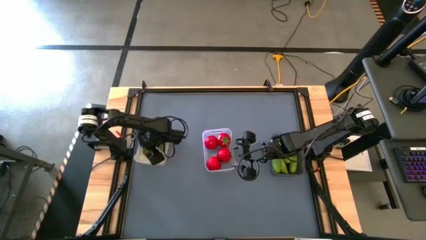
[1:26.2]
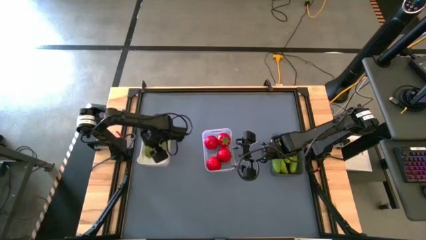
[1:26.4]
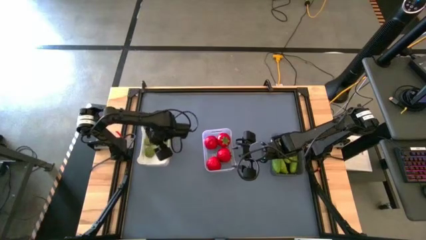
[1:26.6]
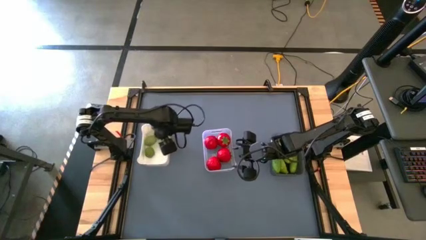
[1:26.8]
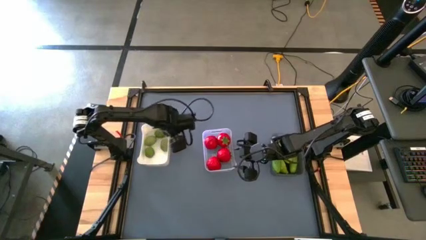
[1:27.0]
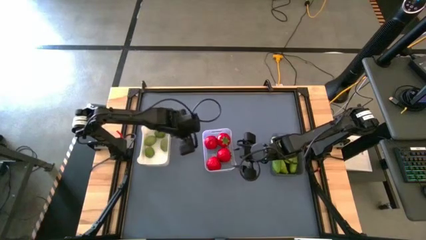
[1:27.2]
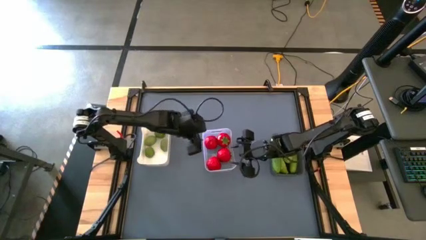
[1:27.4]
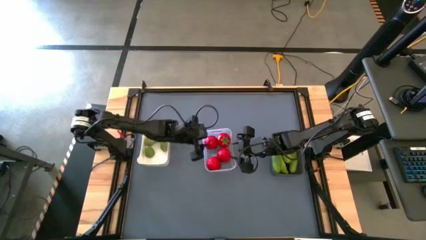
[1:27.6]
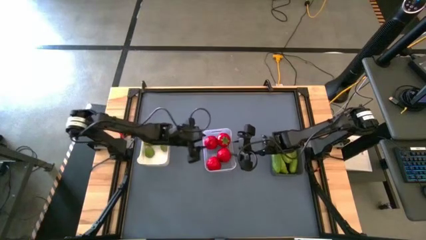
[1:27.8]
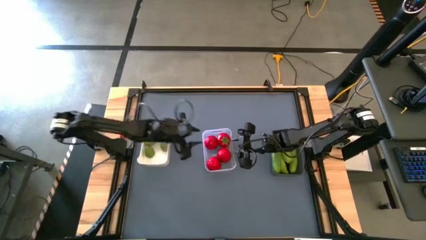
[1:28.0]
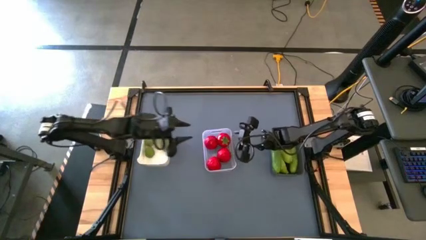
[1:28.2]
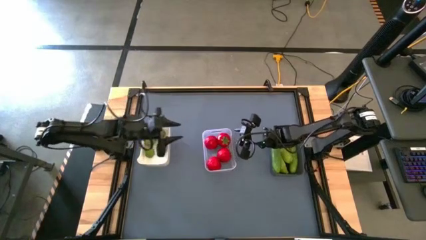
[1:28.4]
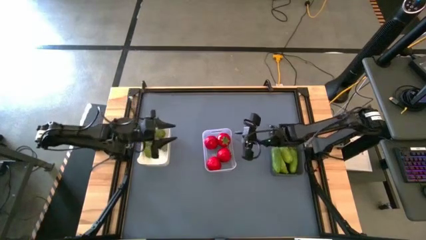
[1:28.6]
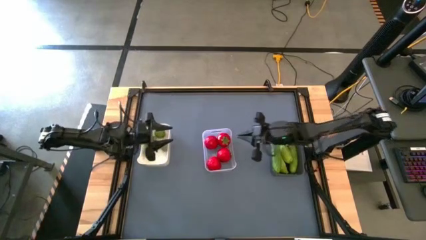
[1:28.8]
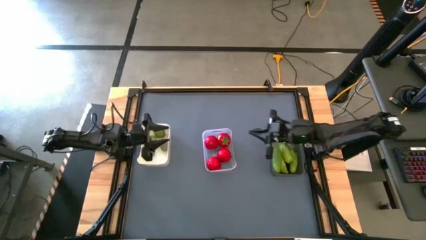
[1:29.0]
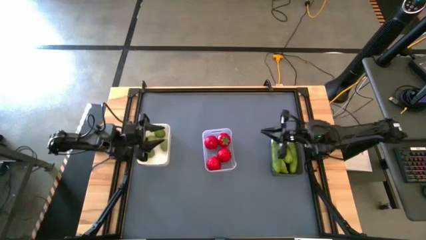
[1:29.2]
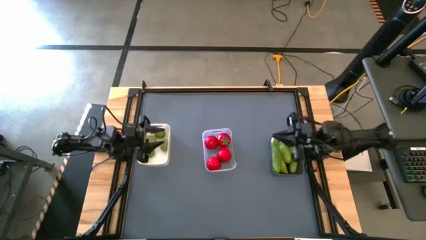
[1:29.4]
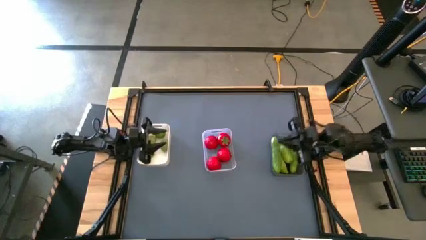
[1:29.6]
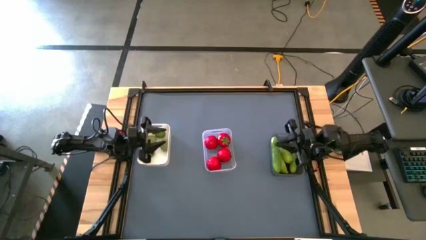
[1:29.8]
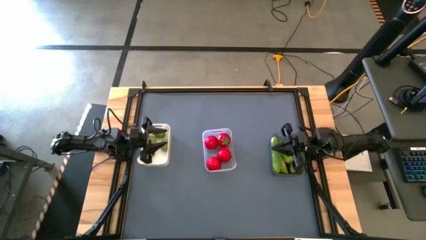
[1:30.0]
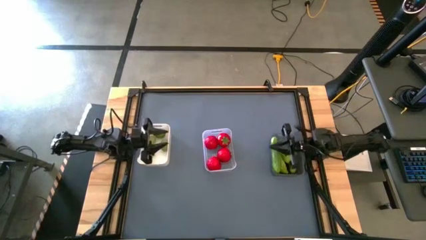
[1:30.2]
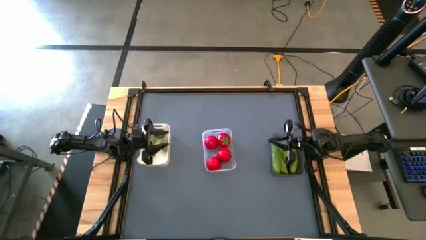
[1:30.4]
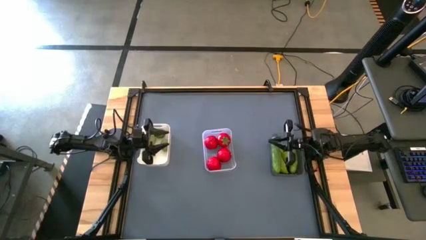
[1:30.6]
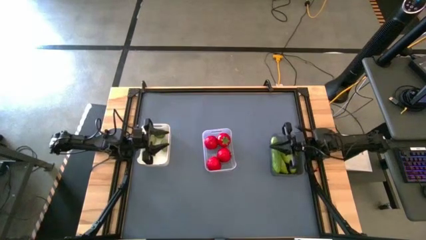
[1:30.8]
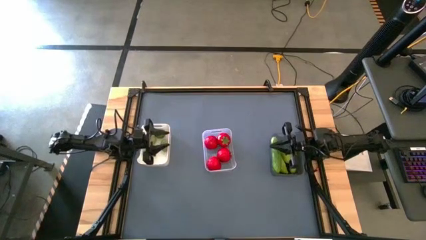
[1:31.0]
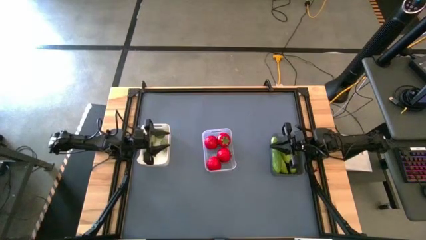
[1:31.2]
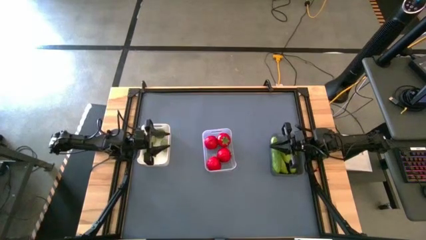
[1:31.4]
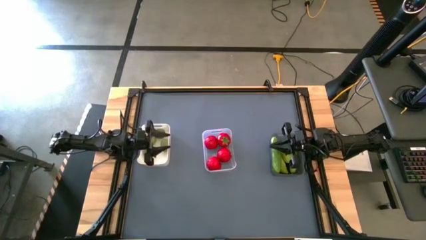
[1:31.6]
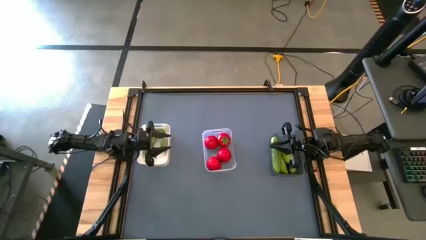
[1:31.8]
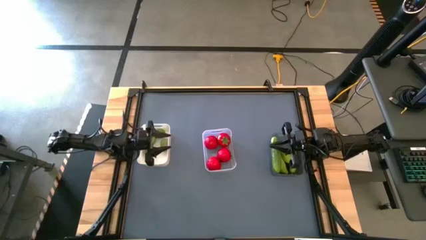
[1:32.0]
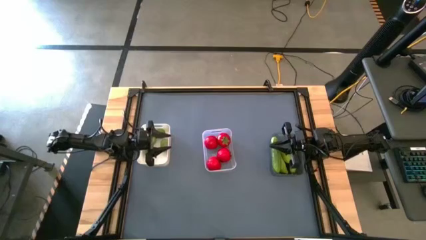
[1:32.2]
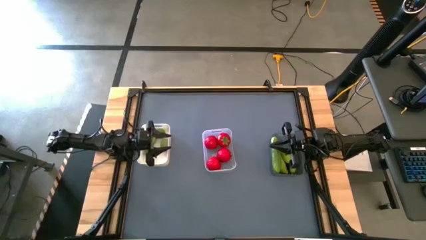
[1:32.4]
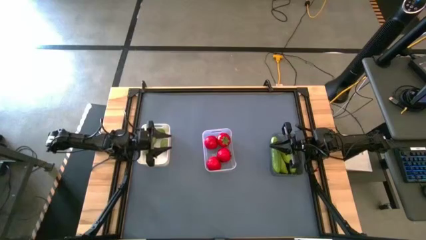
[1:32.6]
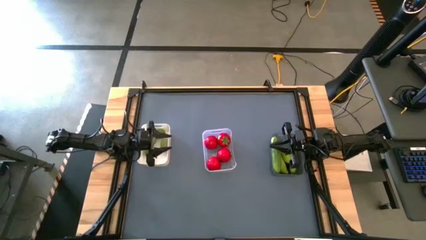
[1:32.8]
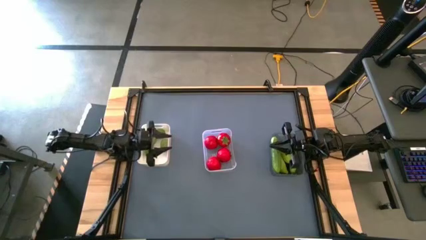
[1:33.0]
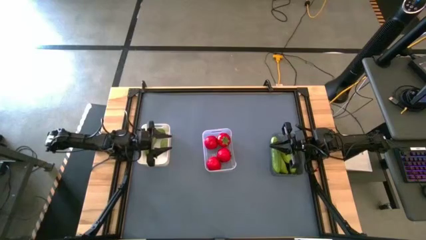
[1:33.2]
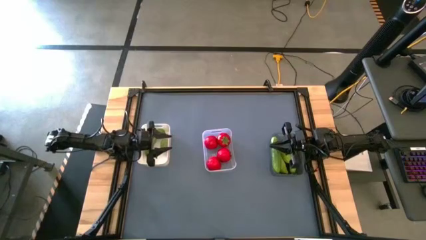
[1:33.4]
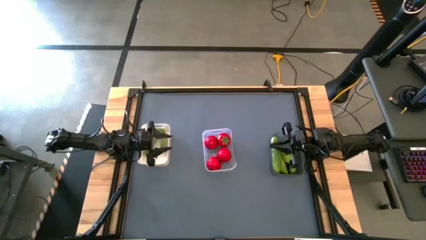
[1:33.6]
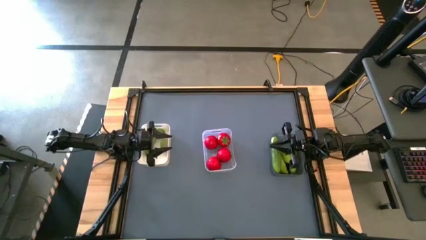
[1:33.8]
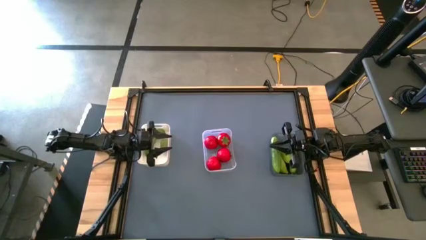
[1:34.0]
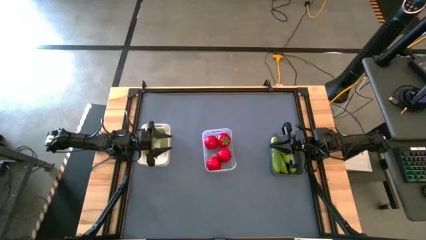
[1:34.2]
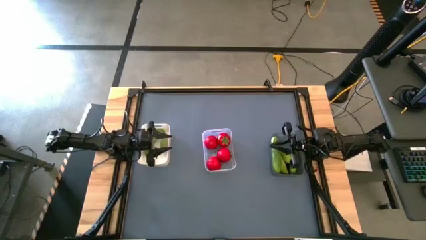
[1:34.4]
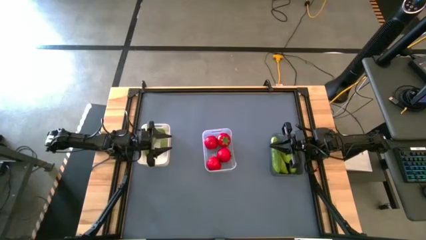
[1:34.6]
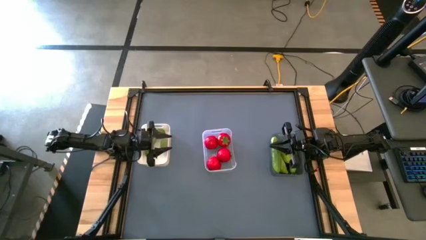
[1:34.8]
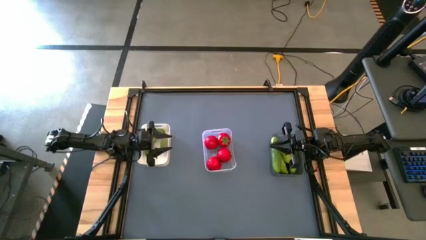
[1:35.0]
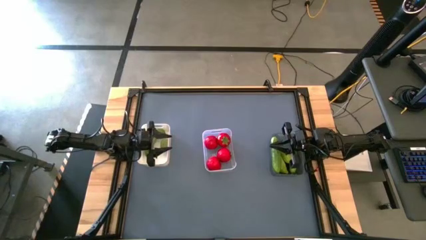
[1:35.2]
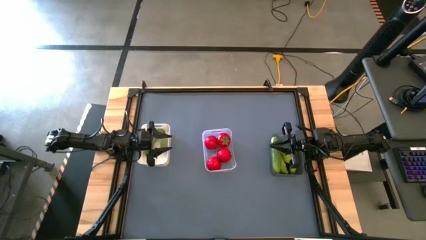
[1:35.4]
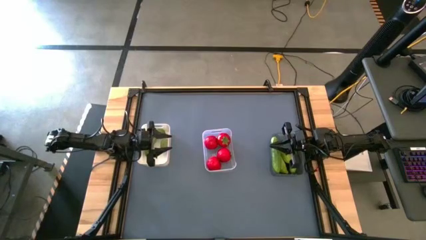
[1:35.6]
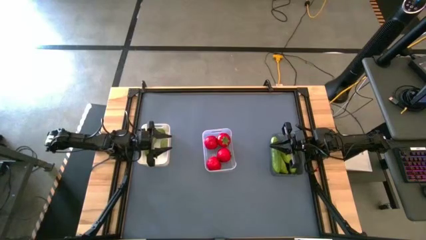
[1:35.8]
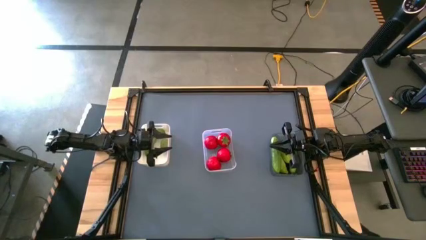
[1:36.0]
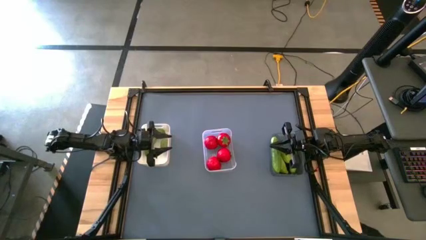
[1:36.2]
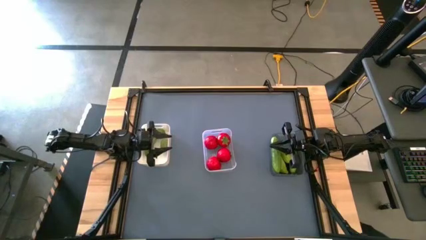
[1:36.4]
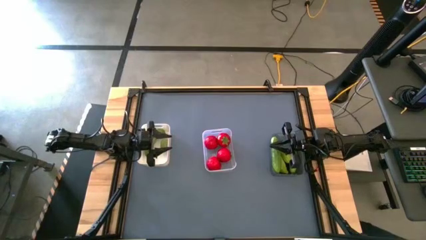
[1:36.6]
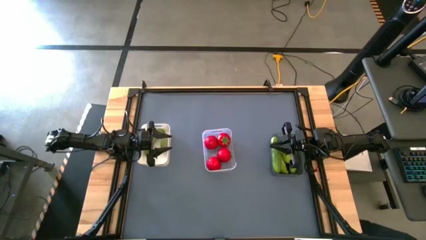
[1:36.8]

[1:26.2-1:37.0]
Task: Sort produce into baskets
Return to Home Position

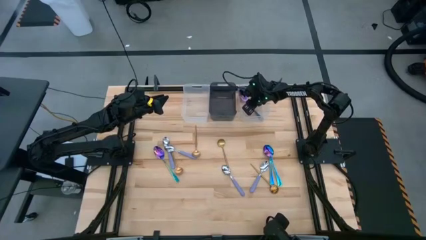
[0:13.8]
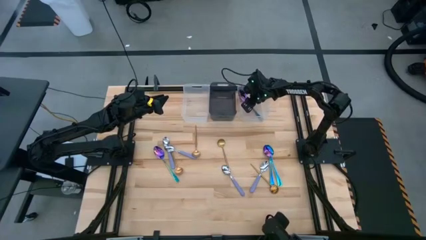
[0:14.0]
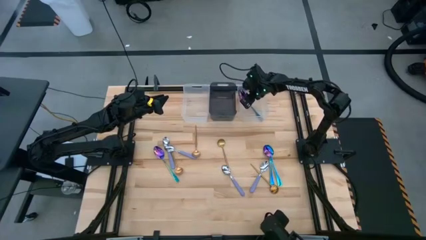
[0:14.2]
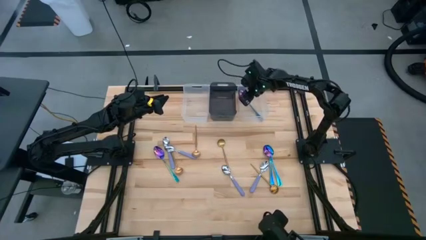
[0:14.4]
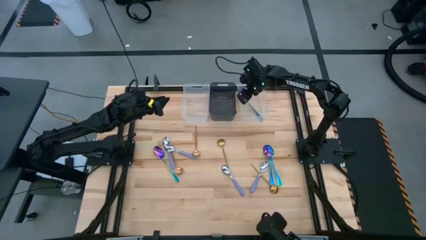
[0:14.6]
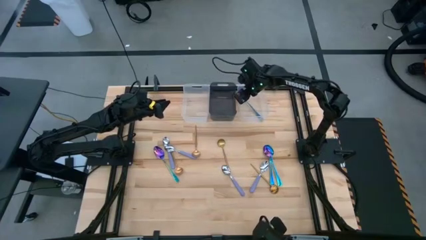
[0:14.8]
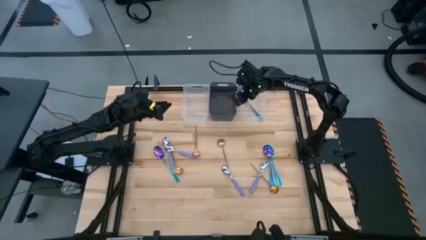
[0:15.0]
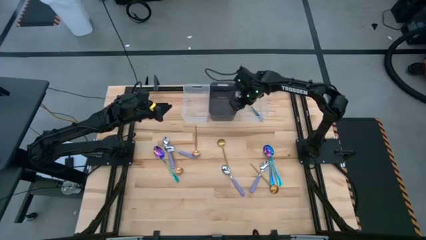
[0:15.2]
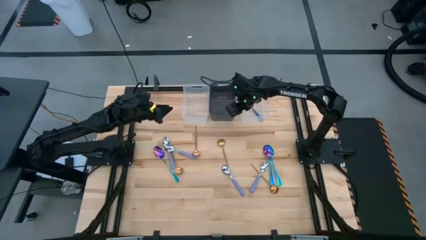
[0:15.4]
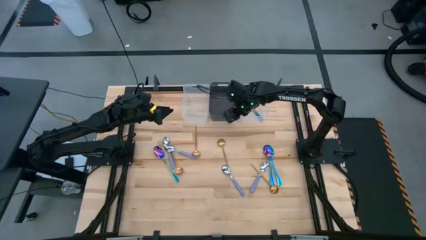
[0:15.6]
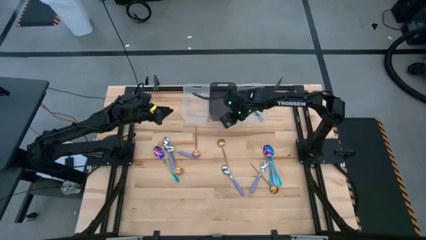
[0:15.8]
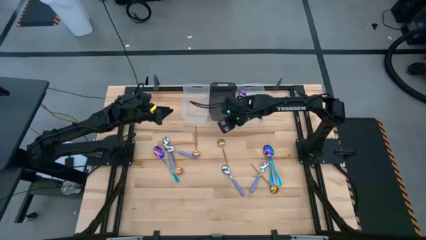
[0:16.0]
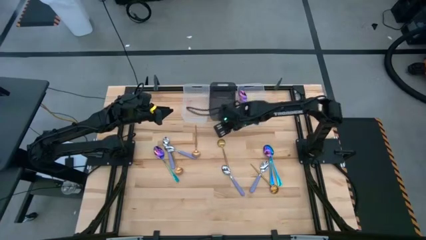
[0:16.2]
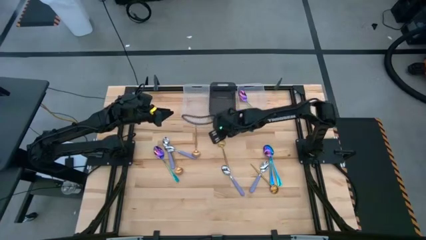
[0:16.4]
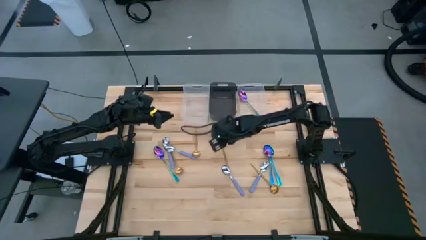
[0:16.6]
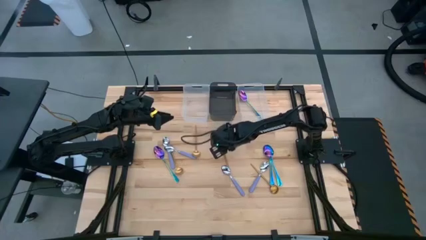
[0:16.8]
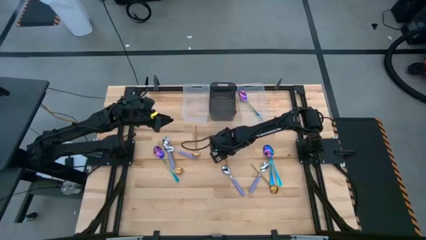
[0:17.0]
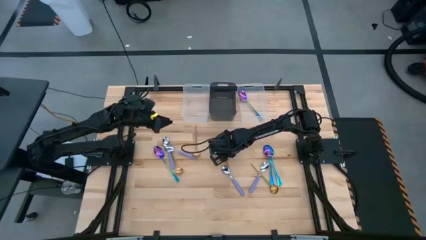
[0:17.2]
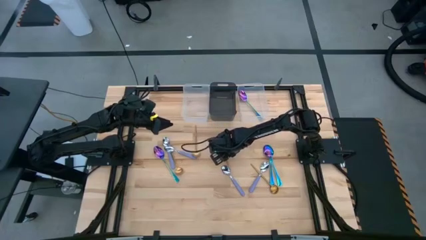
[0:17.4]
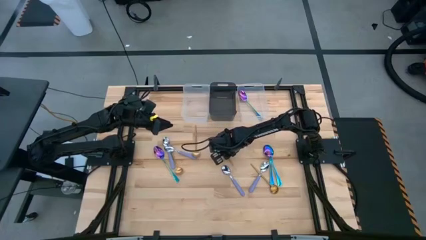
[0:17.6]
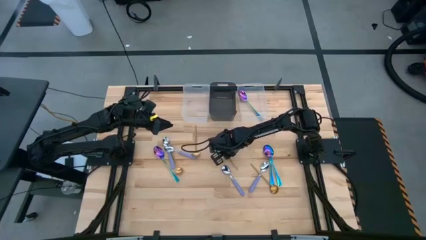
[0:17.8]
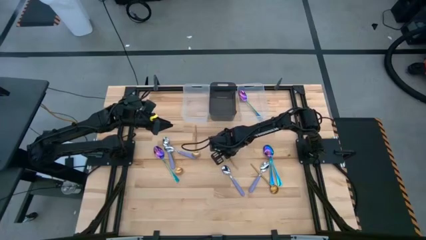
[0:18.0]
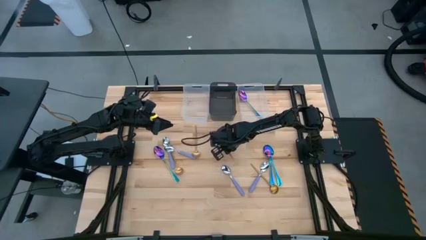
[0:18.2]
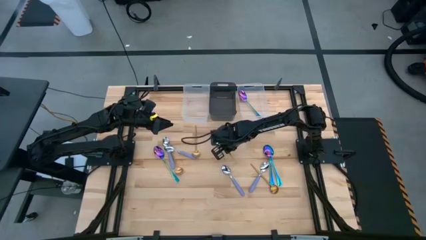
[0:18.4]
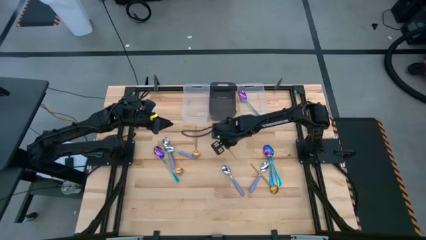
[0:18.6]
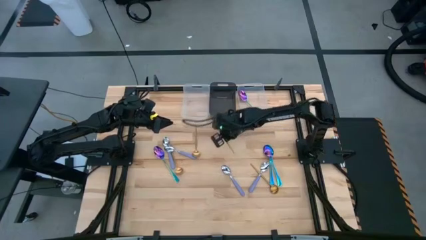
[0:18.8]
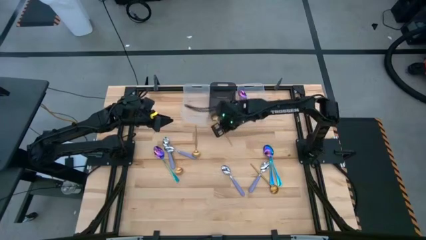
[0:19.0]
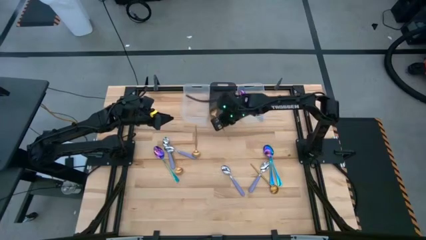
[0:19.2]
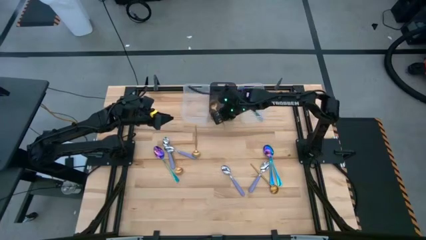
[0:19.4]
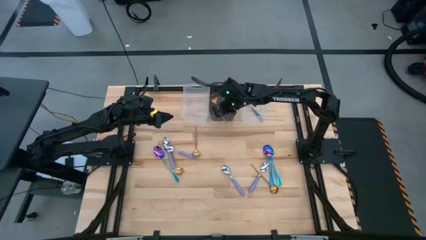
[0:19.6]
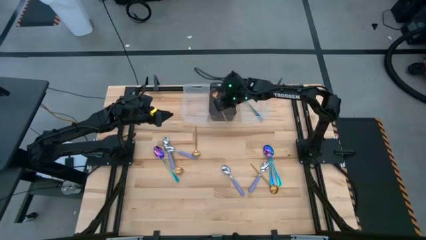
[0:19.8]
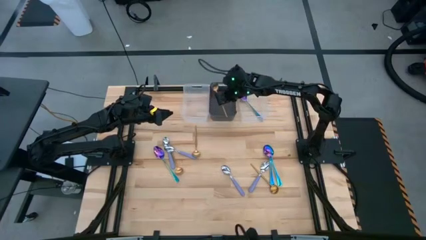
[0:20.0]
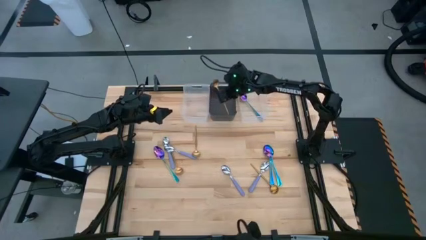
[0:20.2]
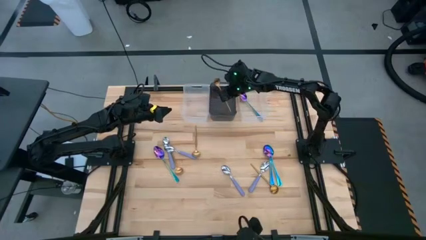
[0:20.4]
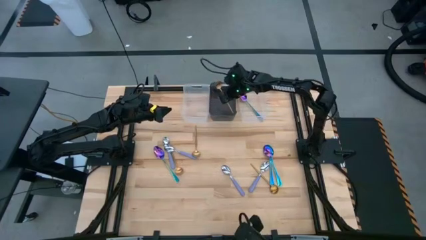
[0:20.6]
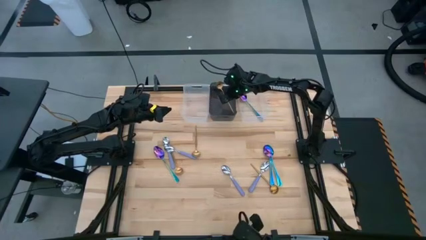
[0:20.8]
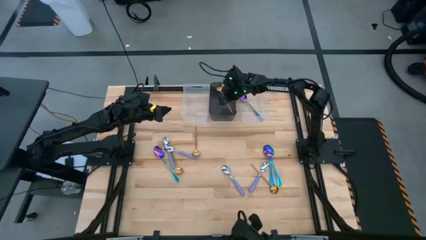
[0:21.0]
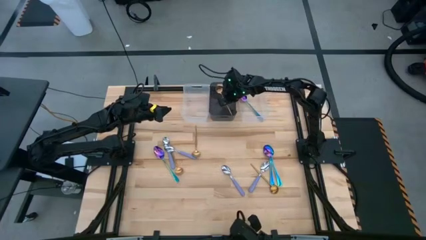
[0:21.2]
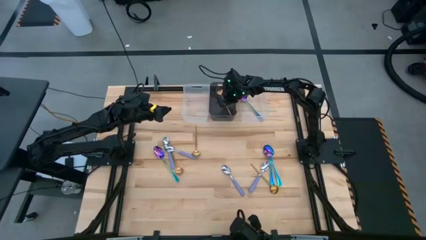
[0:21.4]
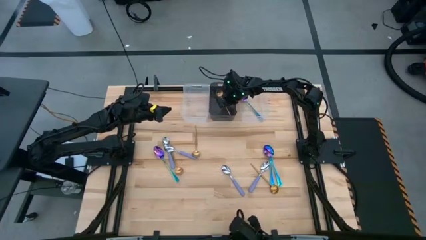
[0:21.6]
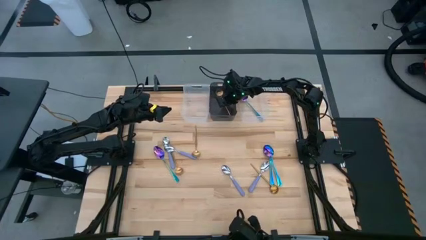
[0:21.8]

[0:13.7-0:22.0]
Task: Sort silverware by color (type)
Put the gold spoon into the black bin
